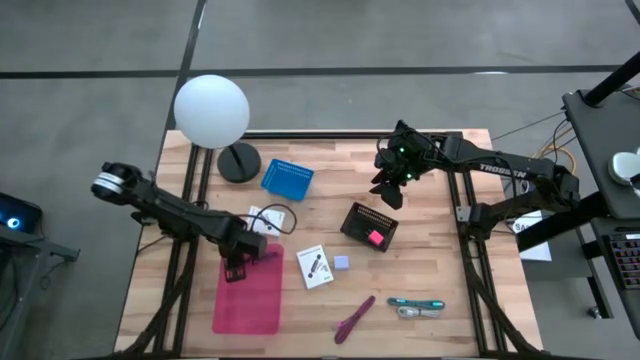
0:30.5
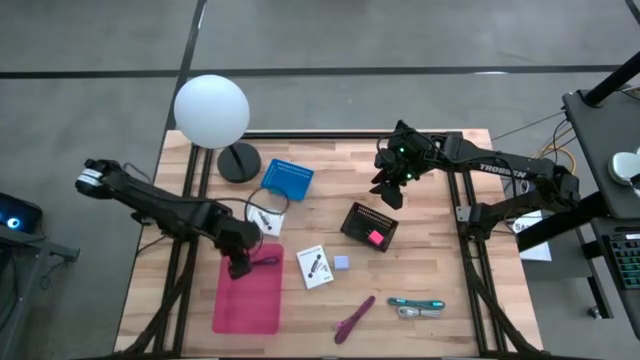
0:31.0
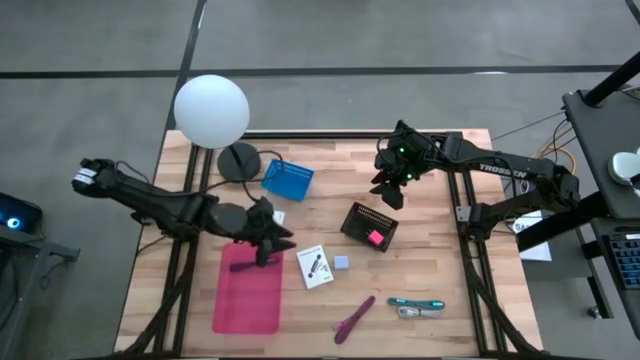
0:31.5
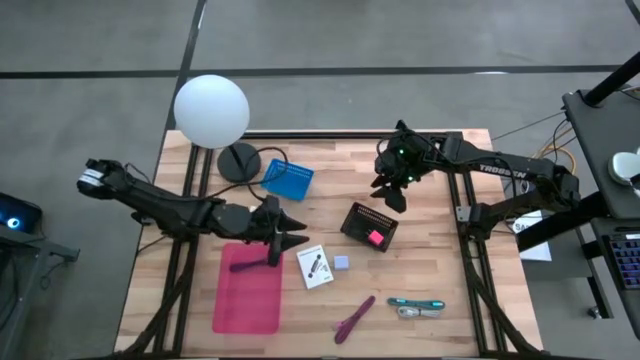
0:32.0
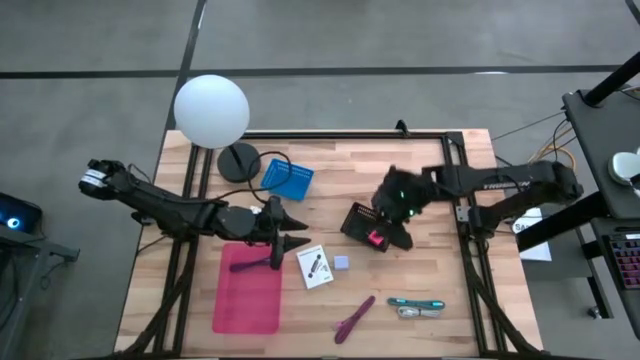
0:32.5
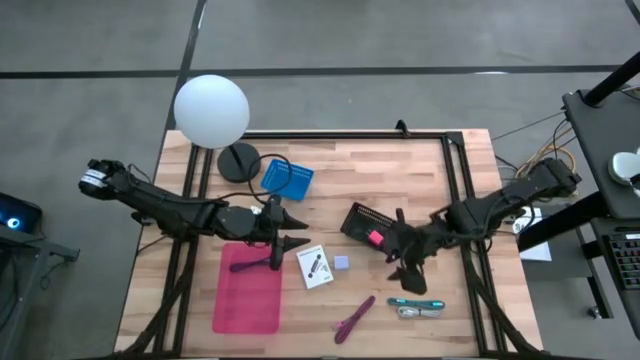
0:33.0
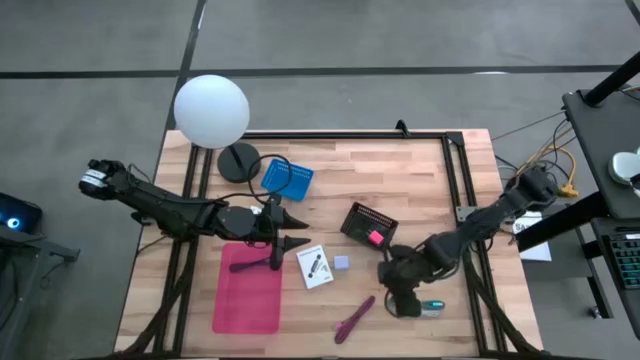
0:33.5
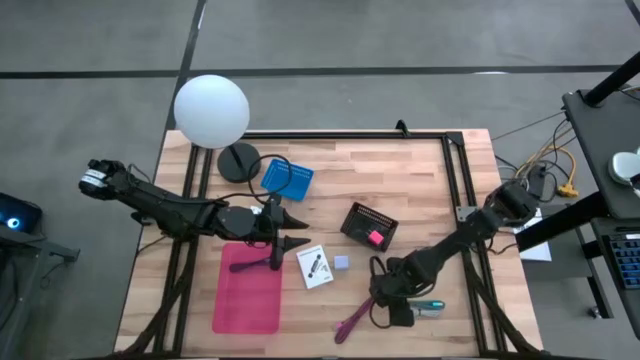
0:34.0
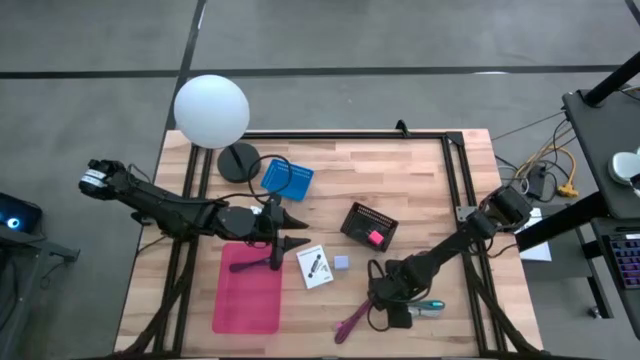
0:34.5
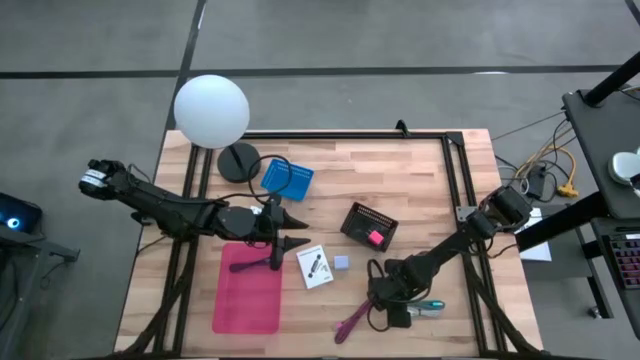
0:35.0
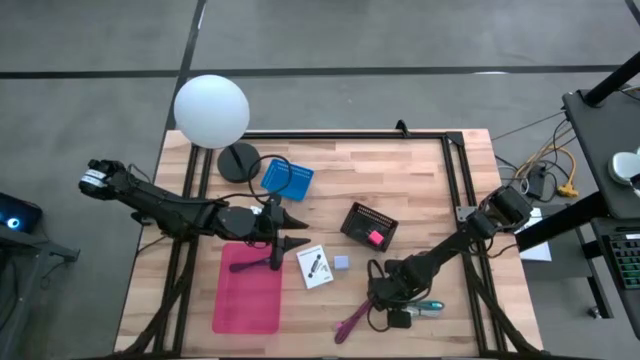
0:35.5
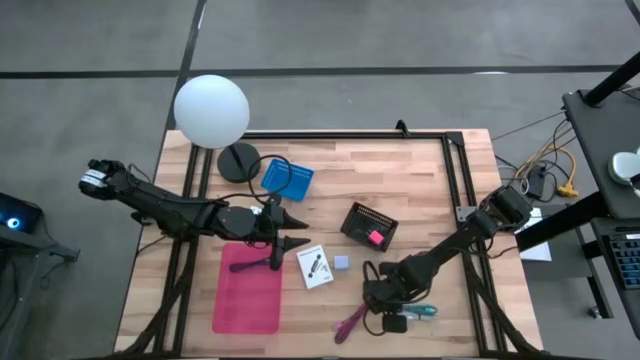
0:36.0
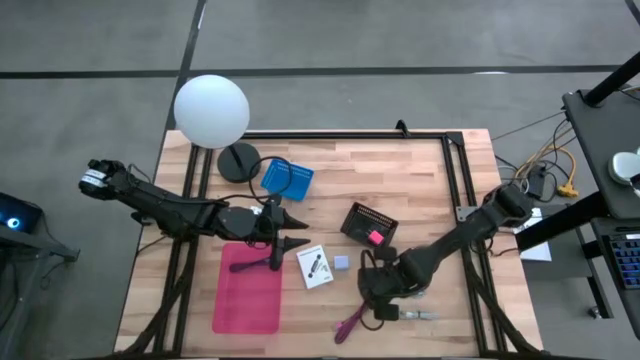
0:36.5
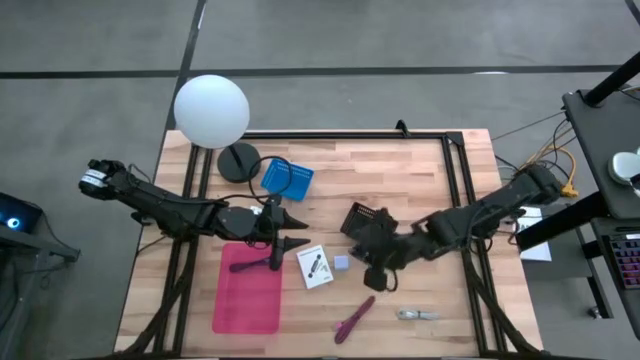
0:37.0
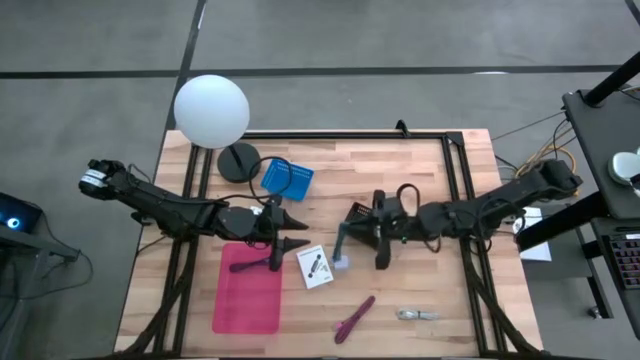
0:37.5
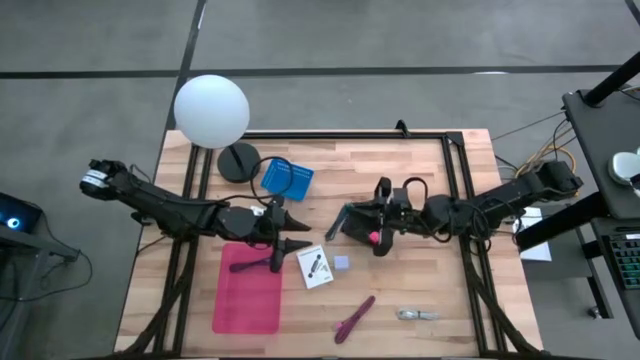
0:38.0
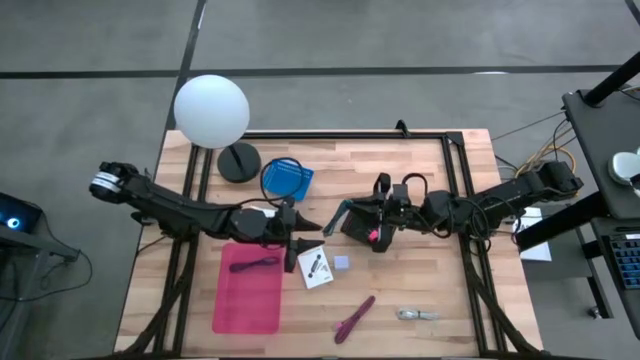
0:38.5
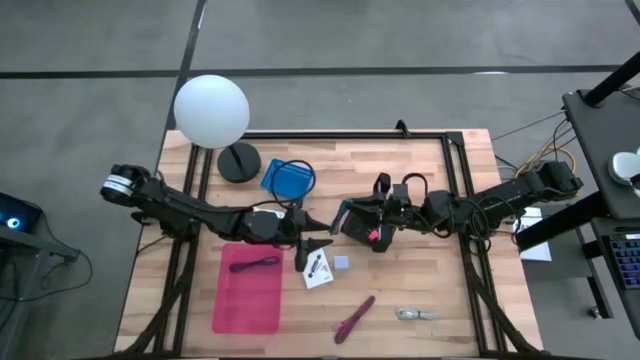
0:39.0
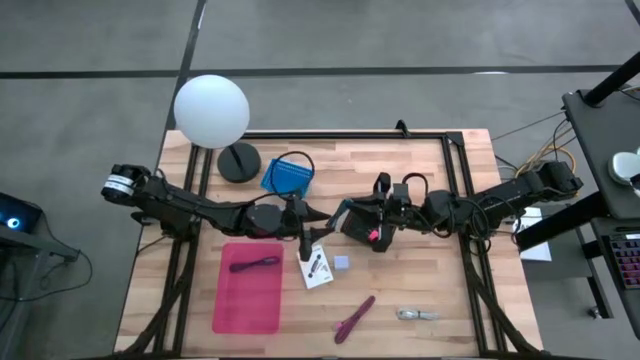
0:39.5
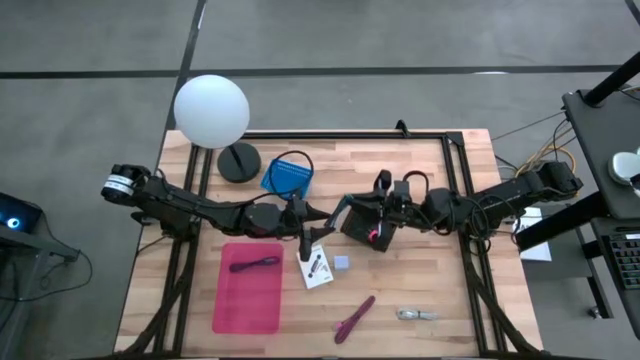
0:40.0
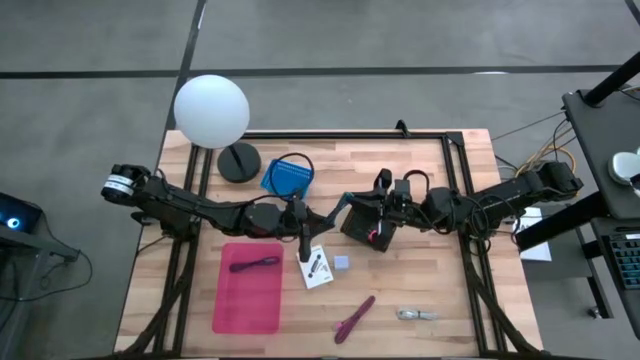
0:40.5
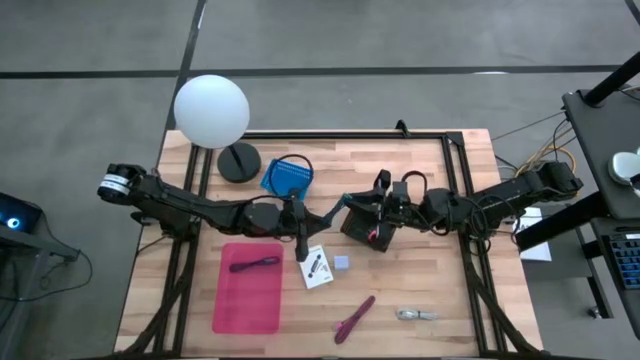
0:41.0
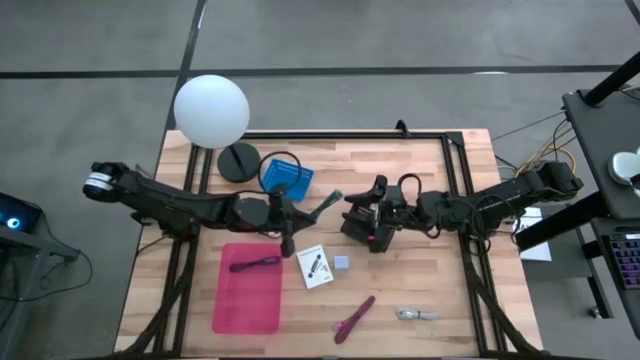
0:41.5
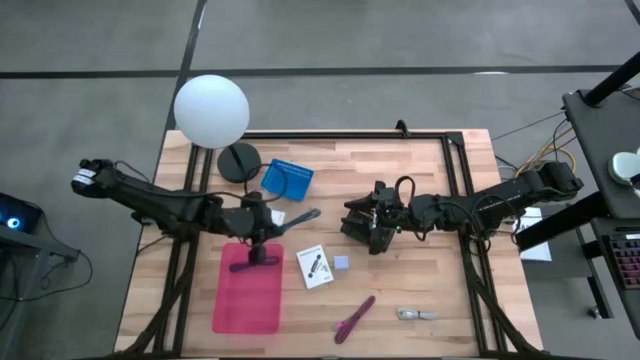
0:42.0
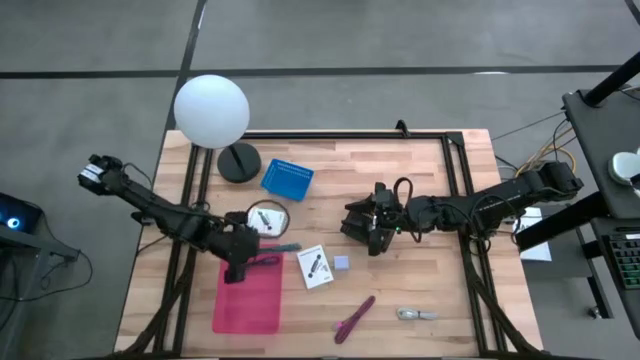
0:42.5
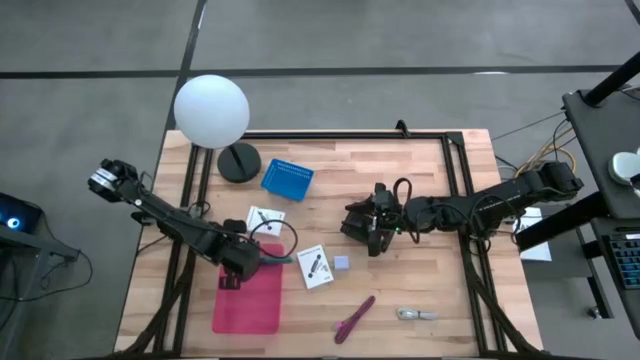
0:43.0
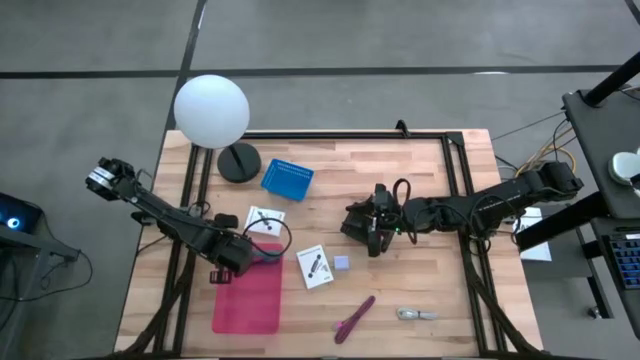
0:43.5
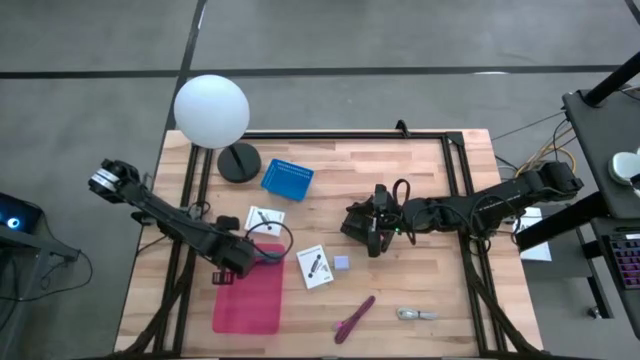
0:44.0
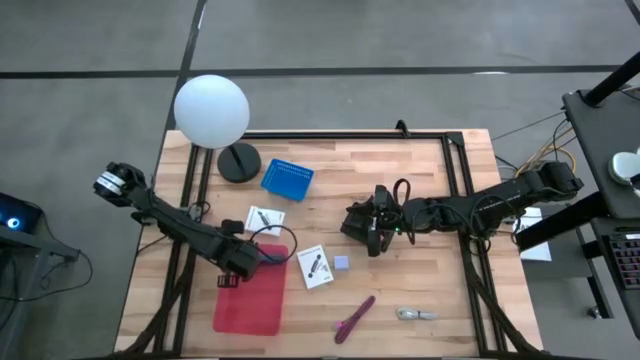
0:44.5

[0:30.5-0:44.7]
Task: Pick and place items into bin
Put the light blue charger cable into the pink bin
